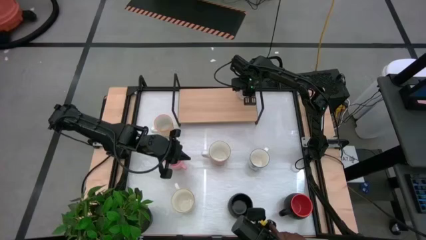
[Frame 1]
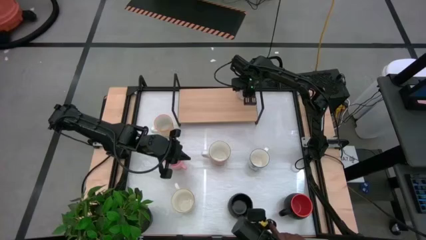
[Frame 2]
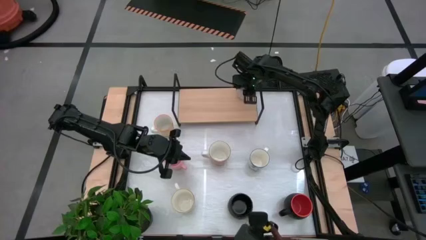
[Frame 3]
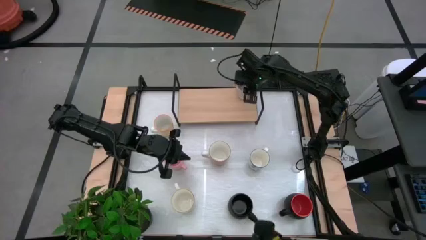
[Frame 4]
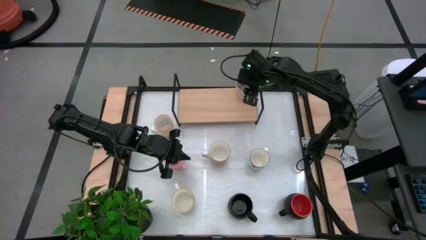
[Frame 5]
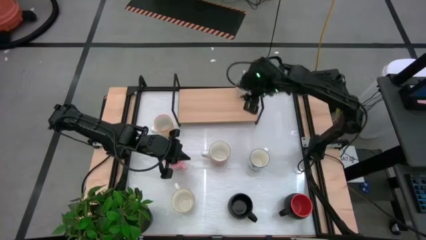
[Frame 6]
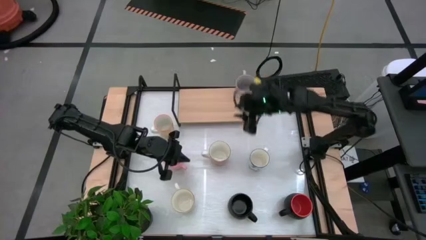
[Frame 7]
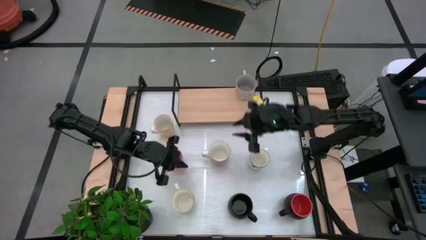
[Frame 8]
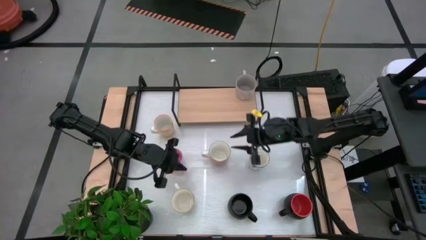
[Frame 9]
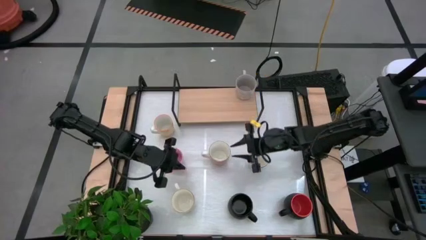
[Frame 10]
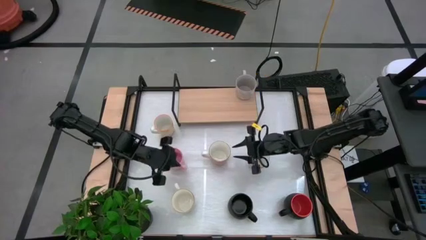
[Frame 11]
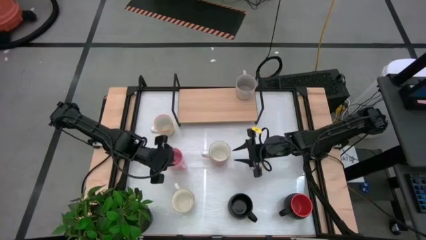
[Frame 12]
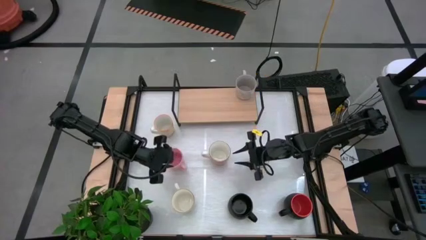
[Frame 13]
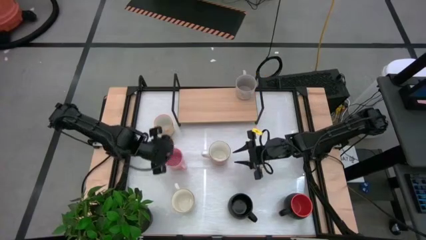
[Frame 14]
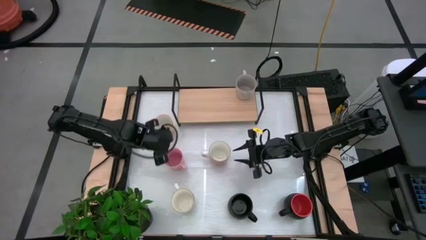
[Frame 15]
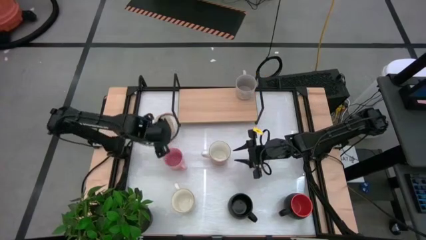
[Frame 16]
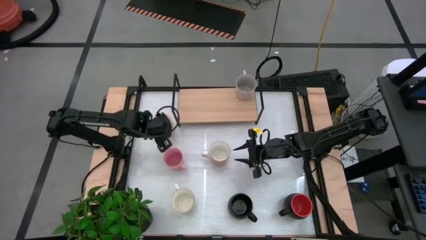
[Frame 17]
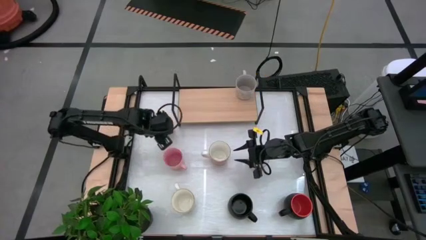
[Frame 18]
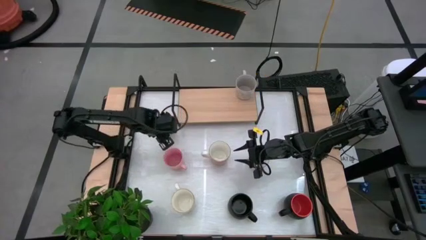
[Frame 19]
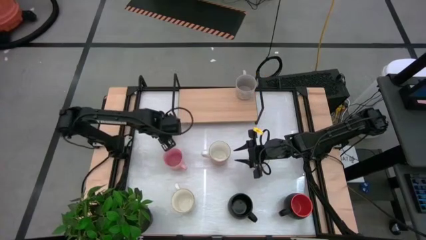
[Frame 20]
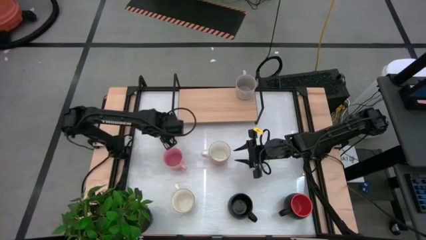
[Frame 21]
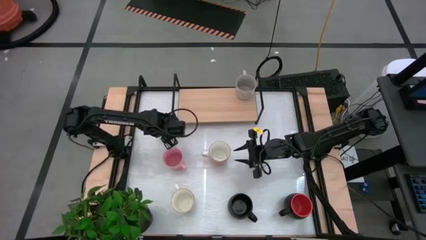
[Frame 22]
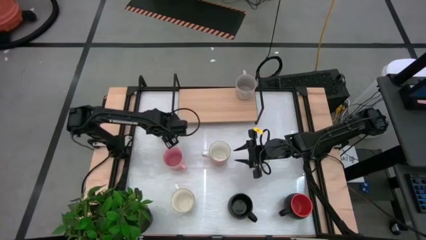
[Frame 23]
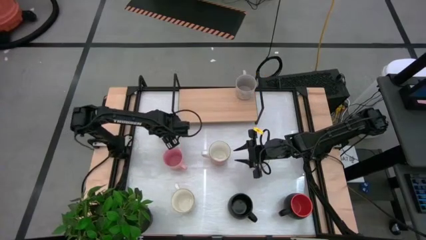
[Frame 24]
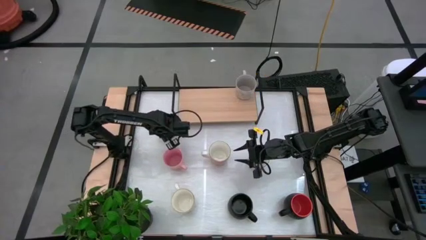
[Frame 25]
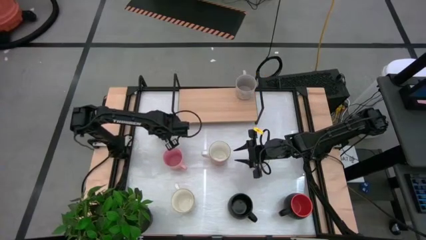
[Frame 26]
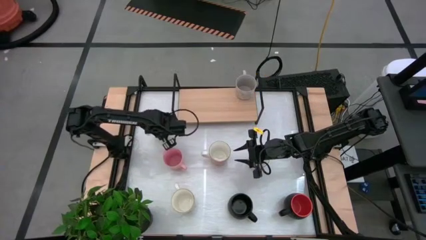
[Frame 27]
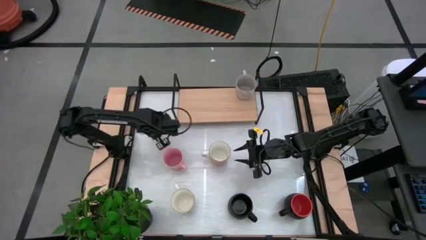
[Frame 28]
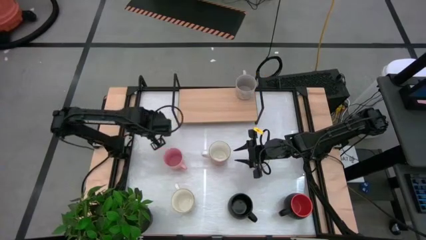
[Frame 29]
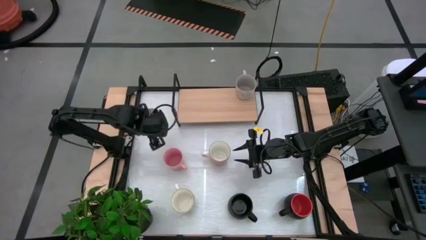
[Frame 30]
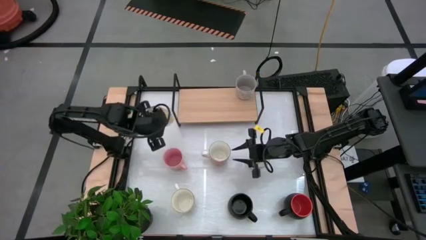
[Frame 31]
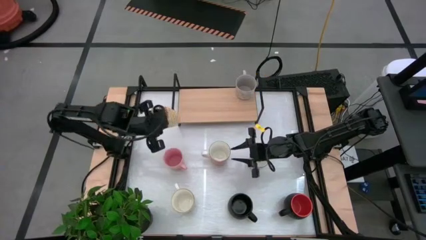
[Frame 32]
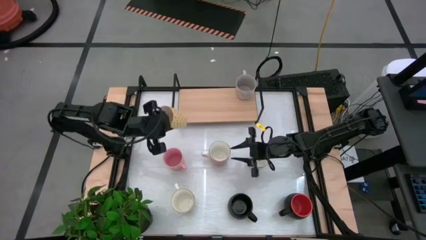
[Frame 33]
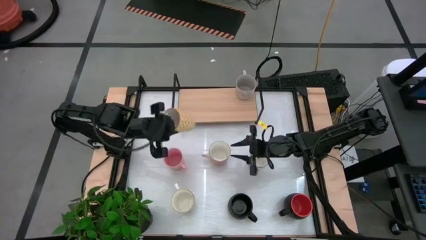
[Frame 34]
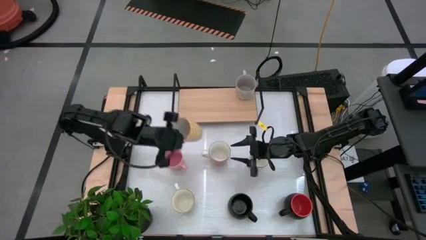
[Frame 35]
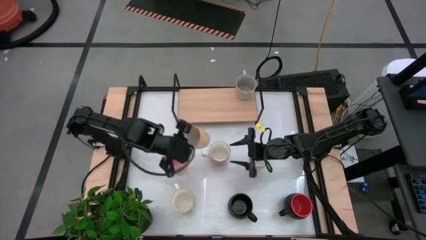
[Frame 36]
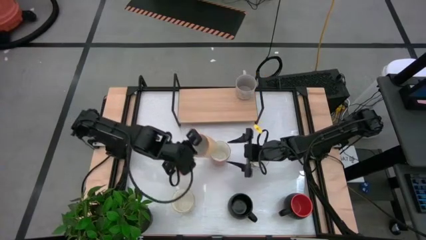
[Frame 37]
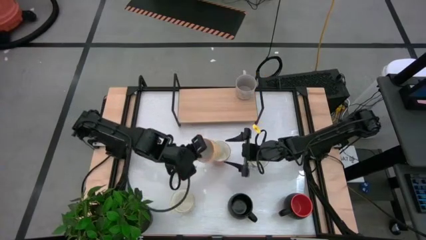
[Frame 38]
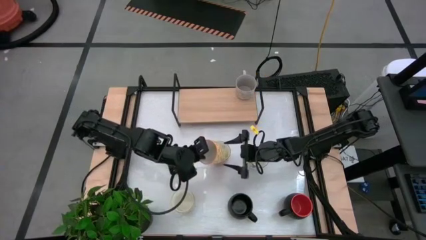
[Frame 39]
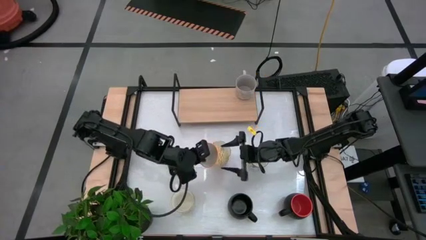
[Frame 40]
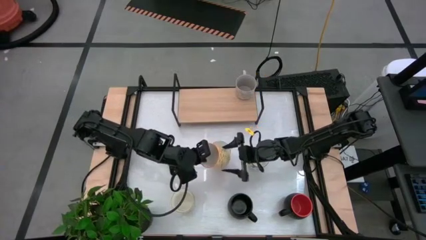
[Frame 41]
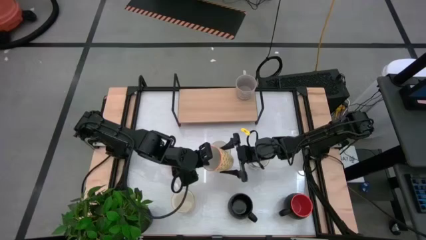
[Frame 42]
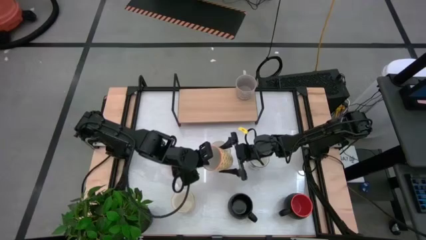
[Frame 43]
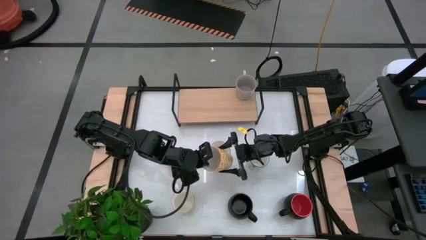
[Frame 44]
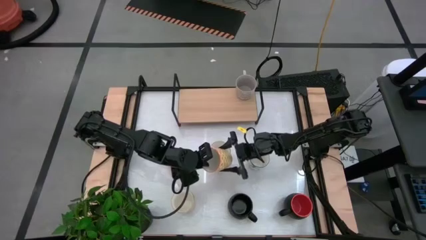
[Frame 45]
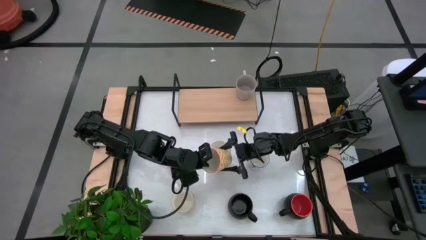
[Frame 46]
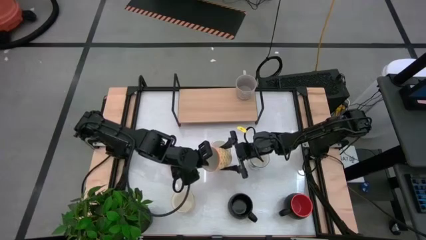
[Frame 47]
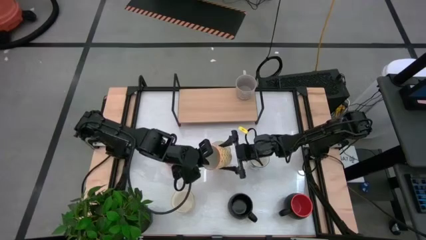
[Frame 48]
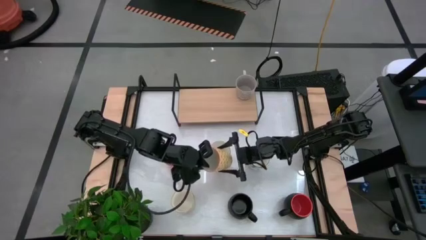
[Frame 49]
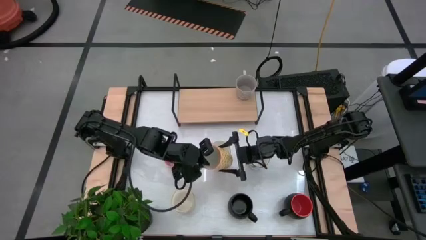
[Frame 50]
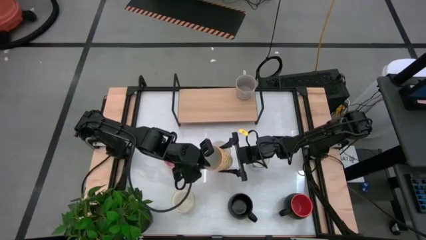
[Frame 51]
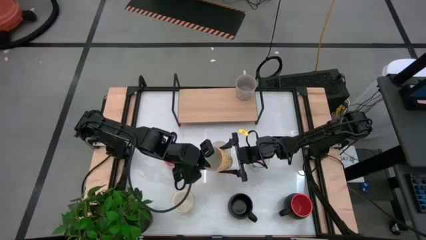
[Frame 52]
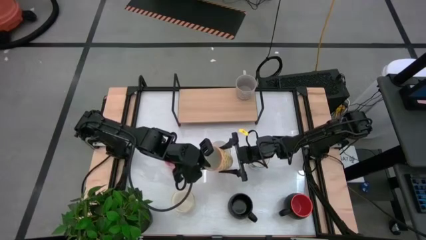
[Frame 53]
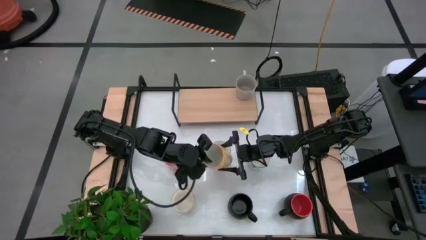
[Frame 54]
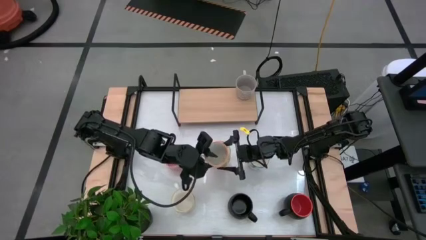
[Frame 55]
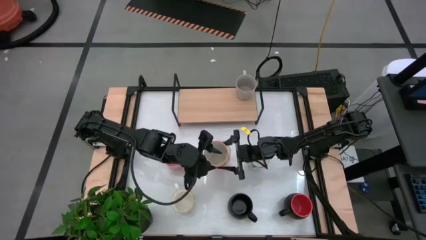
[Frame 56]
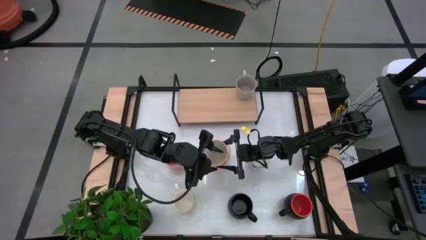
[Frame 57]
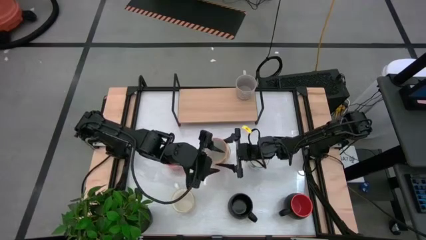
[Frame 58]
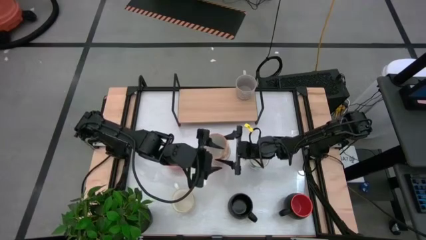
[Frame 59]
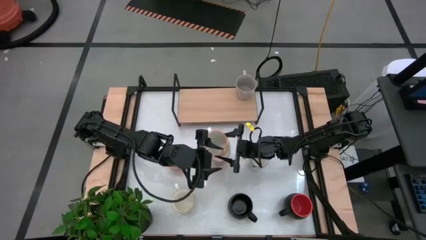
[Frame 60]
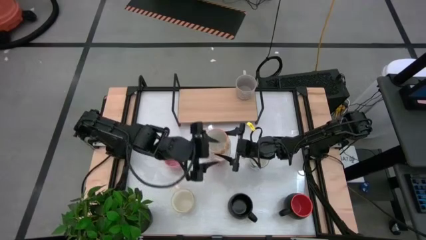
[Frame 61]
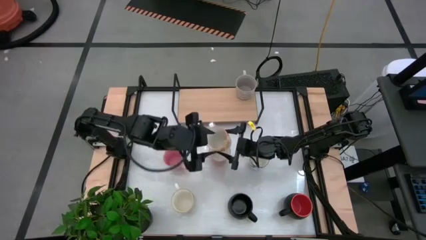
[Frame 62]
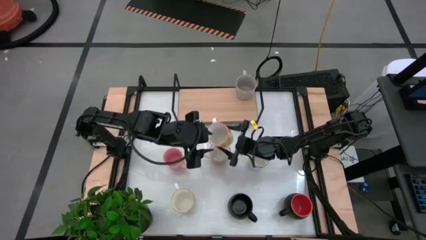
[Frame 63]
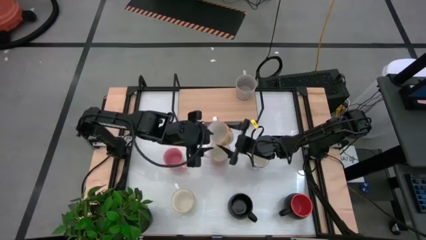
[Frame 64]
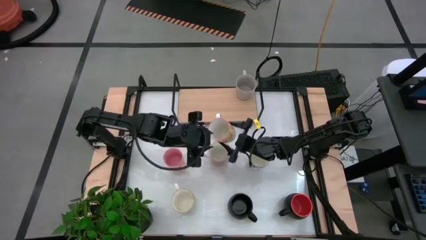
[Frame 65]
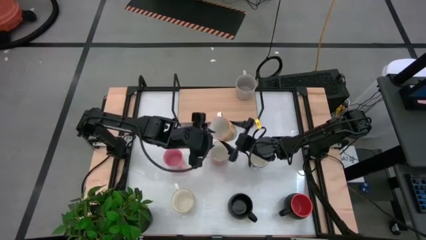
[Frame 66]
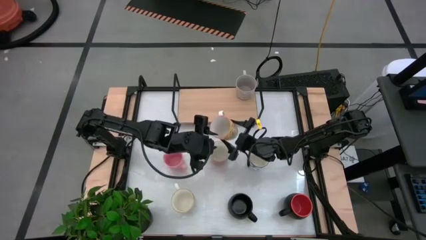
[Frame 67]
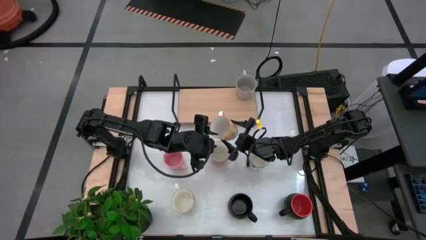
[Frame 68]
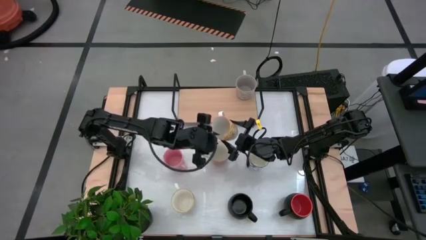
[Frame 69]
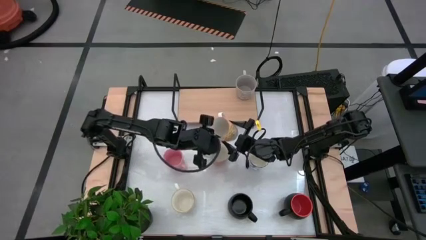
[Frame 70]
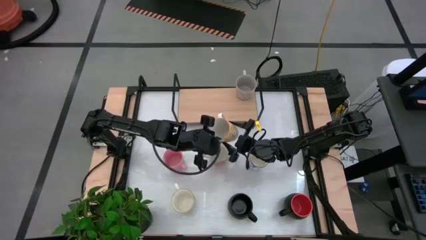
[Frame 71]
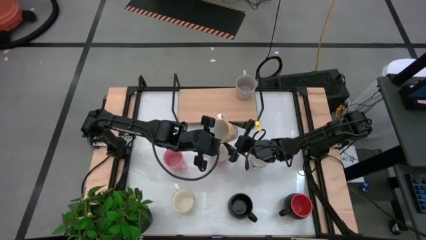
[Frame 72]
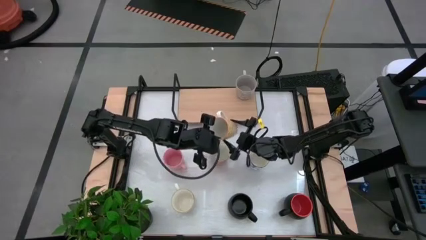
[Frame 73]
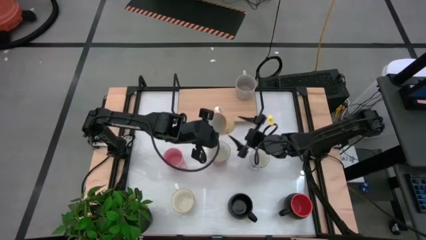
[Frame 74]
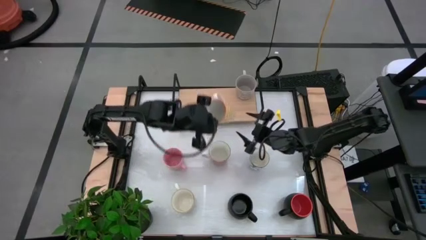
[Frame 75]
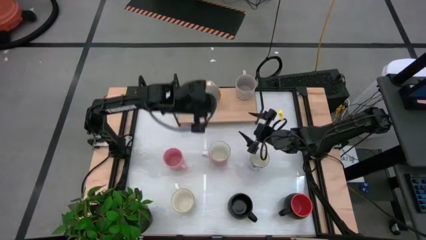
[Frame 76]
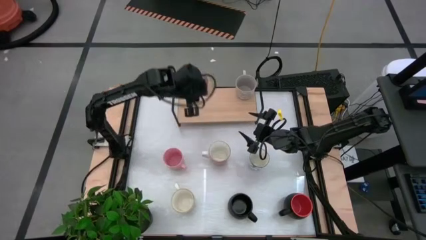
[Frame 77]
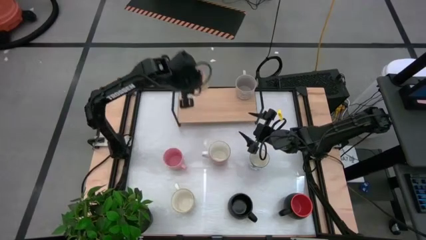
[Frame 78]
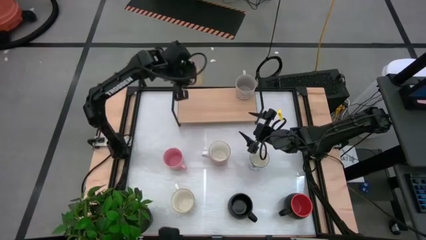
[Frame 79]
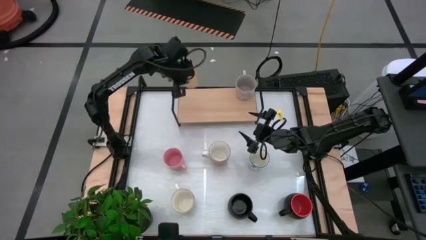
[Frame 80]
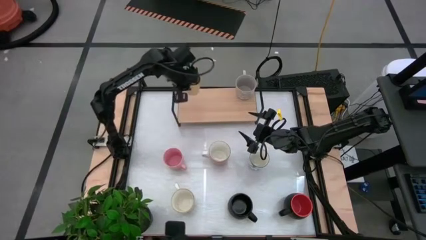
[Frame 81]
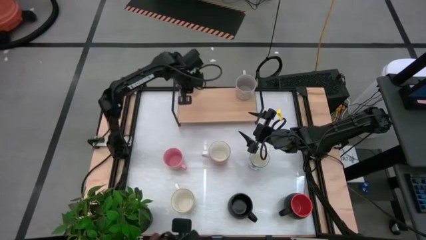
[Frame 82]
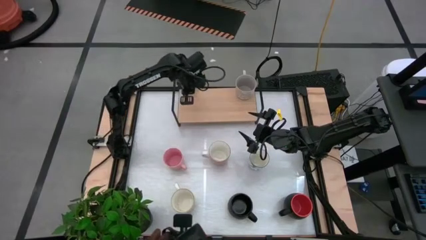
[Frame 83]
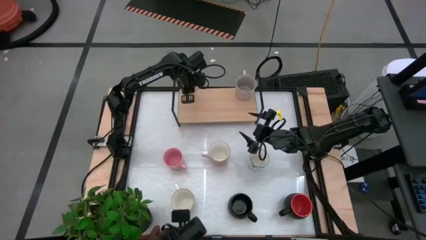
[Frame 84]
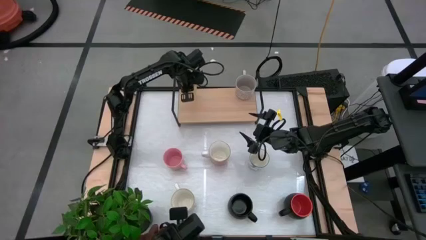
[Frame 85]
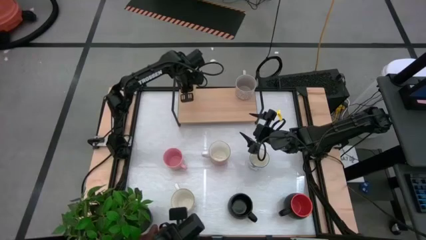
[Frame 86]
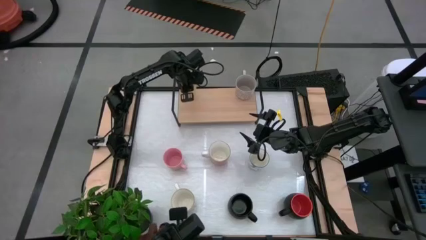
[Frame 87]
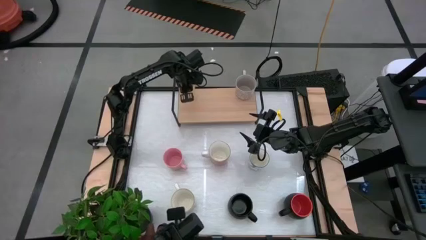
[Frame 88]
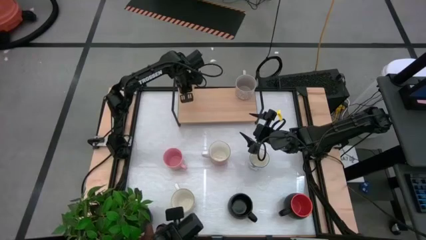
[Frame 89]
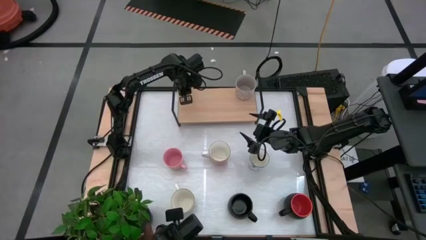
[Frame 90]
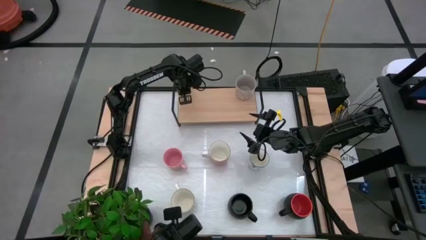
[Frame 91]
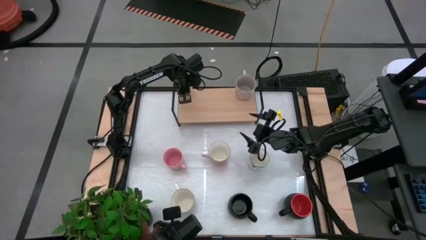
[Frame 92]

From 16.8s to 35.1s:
Task: Place coffee mugs
Put the yellow mug on the shelf
